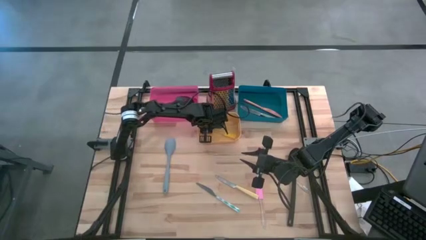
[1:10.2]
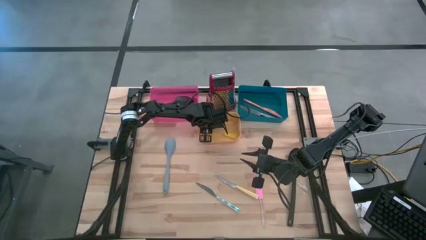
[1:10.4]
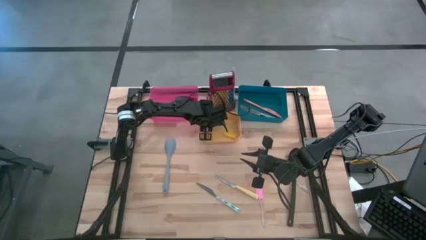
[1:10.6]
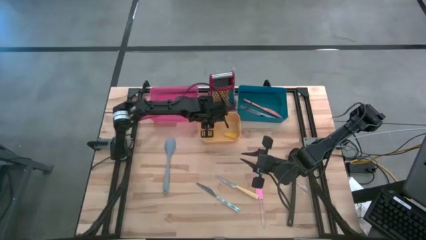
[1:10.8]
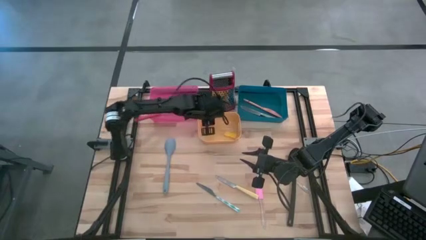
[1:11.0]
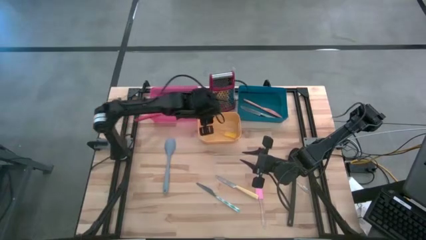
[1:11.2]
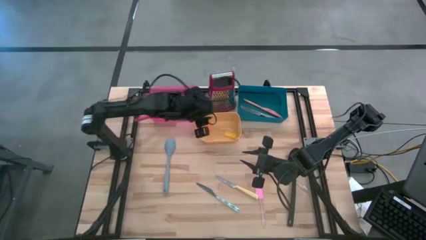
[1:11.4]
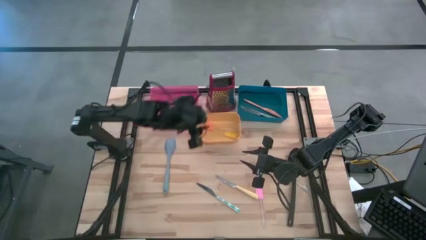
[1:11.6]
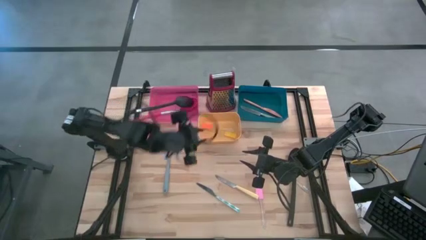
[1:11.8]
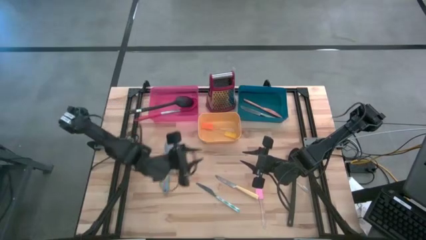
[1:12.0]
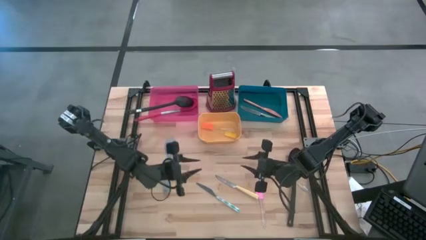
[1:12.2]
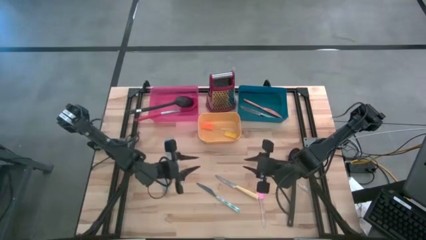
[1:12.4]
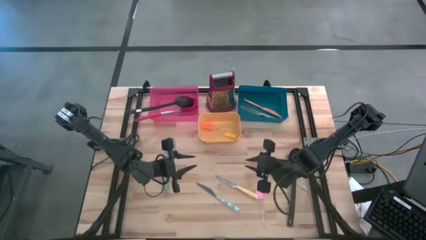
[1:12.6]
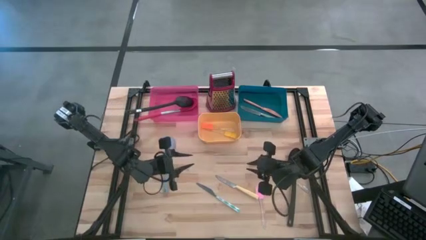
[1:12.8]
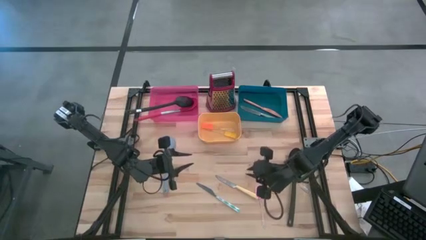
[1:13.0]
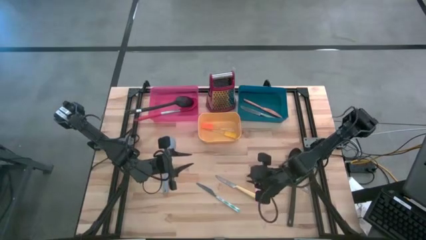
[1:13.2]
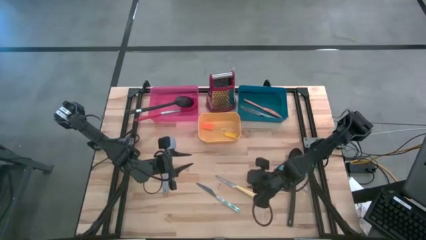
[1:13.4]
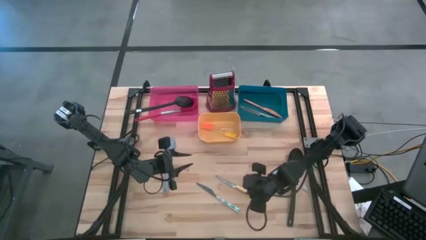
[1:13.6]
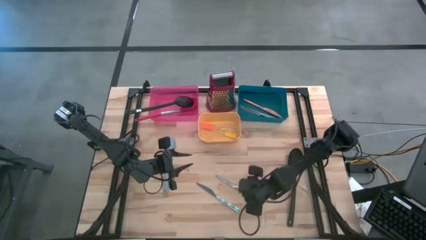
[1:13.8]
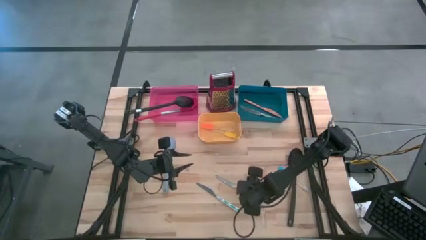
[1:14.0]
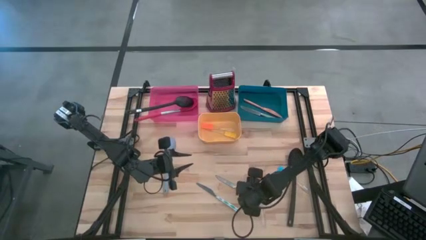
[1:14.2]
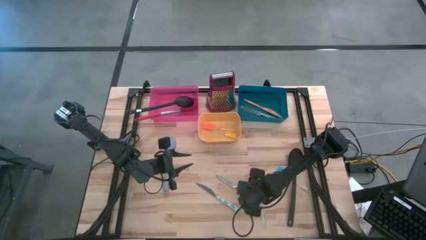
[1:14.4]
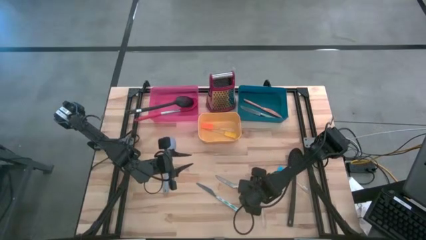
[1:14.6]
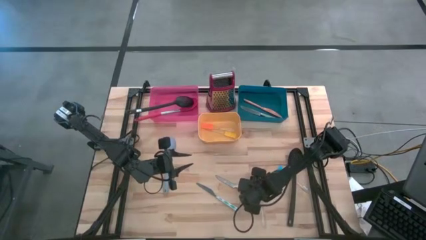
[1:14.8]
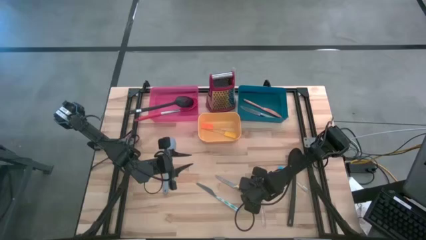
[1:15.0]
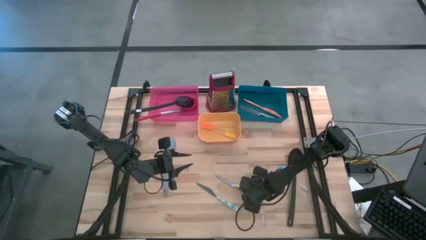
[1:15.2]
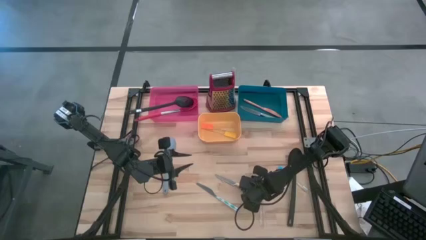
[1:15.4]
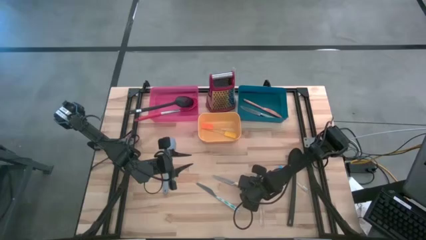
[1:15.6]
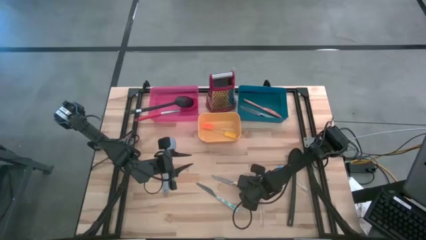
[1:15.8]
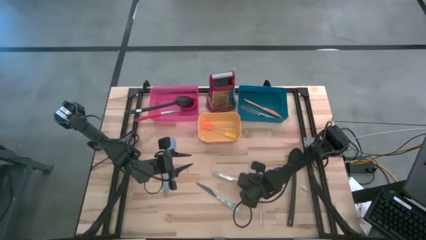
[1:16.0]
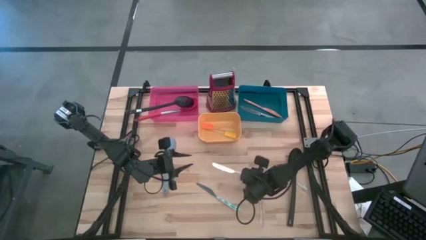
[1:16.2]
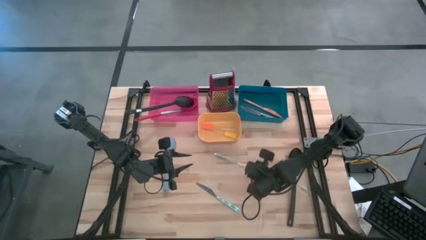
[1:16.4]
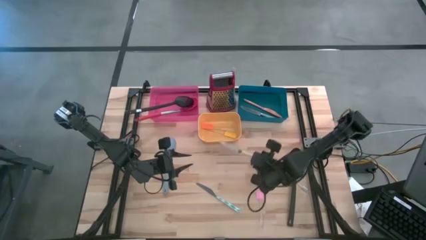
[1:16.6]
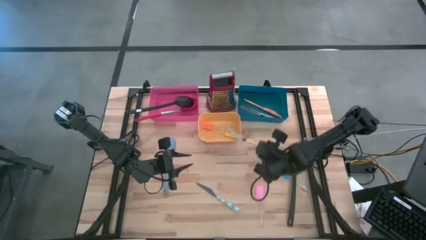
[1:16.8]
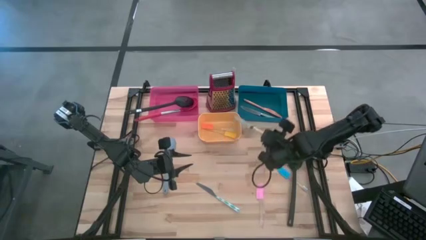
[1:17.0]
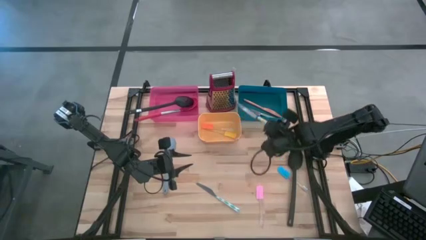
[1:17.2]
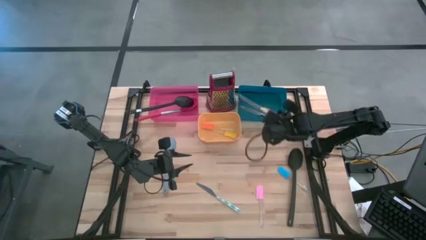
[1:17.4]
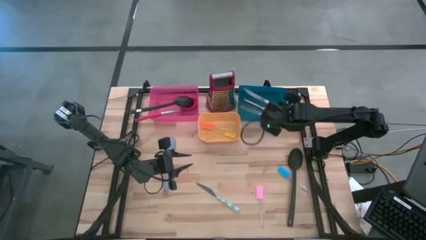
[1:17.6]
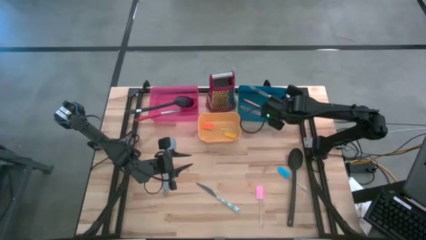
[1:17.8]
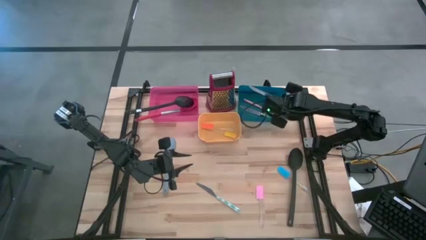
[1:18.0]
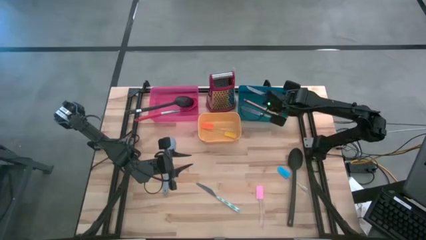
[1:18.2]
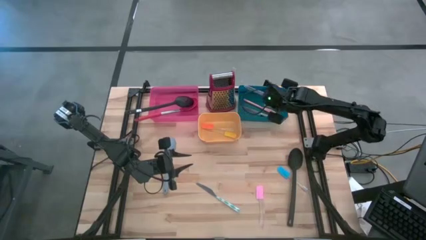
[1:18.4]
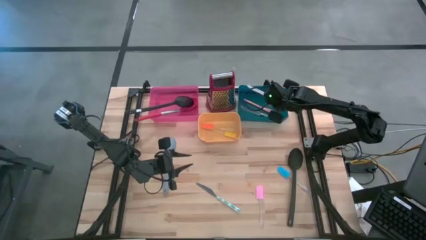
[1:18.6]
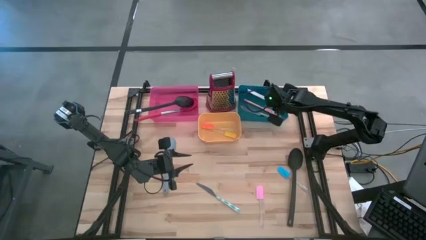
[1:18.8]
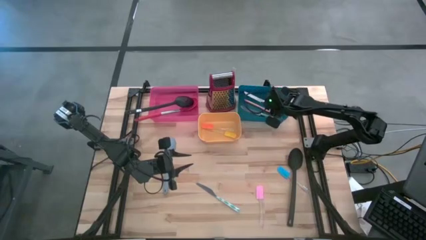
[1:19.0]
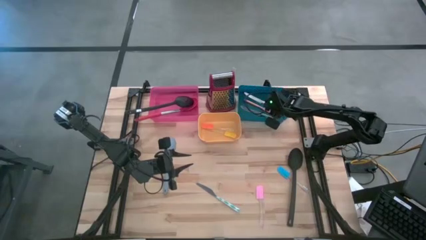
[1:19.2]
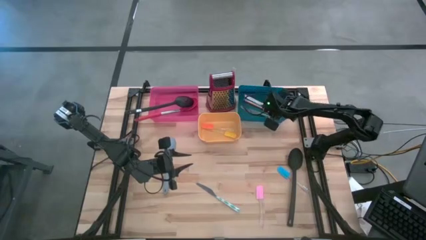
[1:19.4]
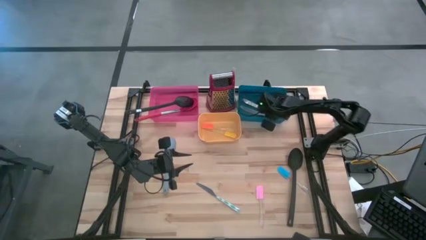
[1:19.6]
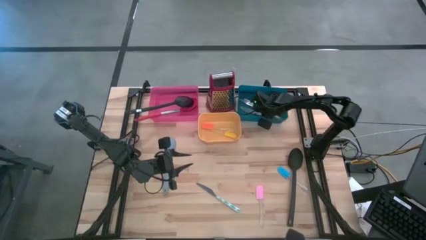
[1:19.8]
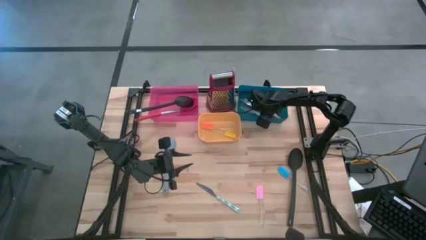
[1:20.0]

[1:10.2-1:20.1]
Task: Pick & Place Kitchen Items
Put the yellow table knife into the blue bin

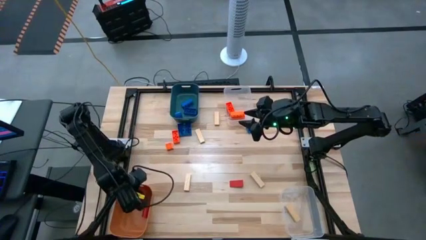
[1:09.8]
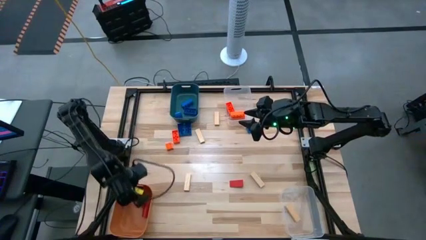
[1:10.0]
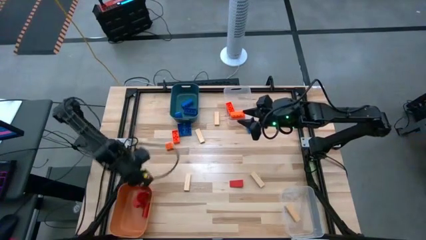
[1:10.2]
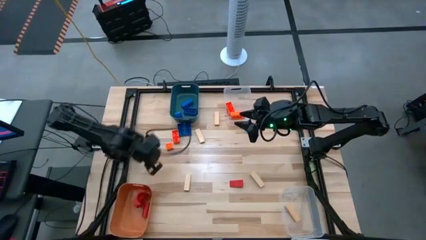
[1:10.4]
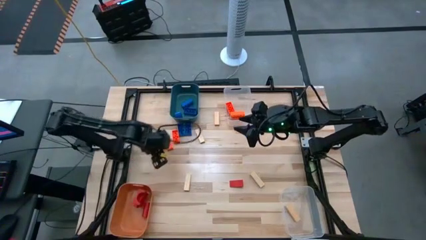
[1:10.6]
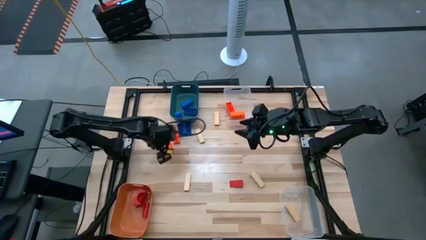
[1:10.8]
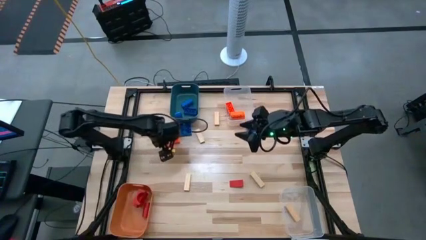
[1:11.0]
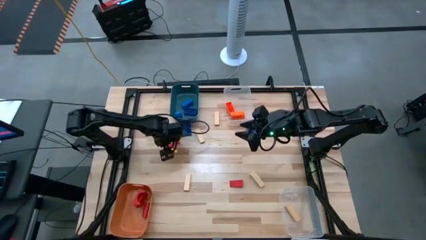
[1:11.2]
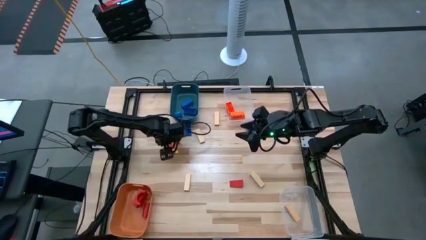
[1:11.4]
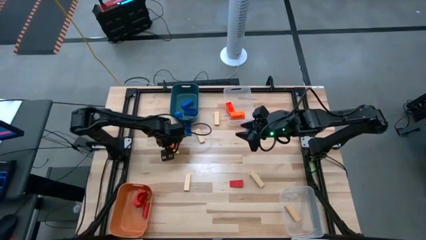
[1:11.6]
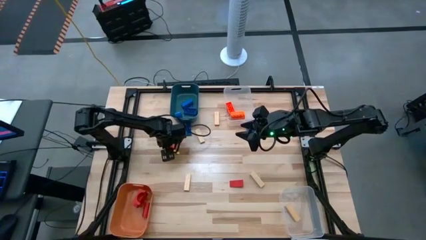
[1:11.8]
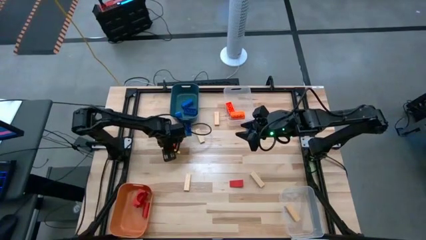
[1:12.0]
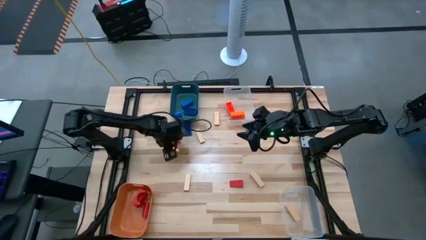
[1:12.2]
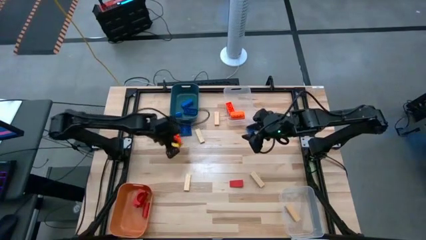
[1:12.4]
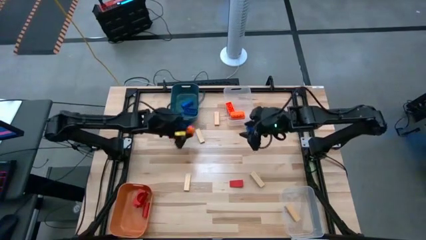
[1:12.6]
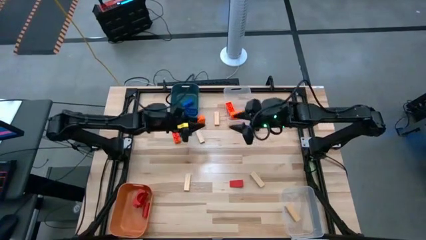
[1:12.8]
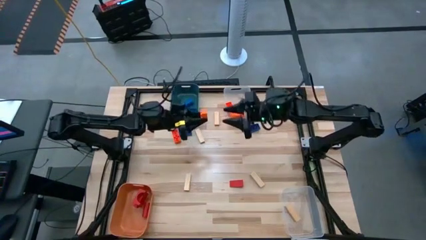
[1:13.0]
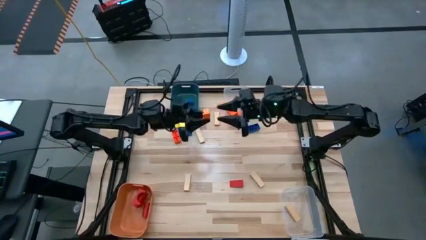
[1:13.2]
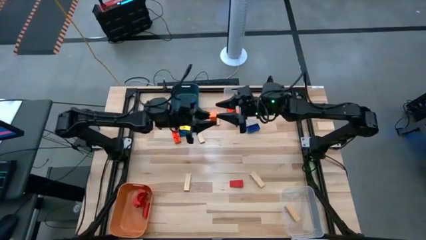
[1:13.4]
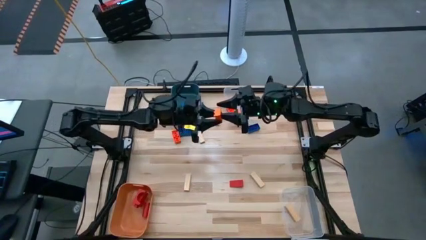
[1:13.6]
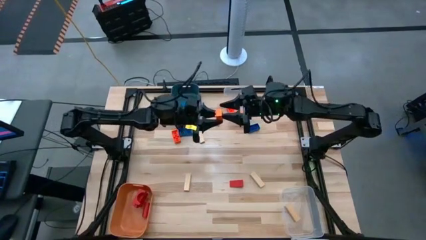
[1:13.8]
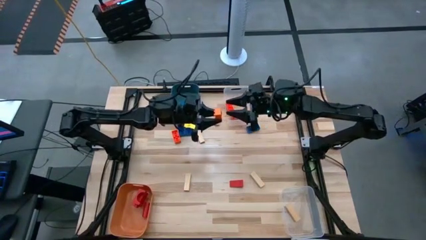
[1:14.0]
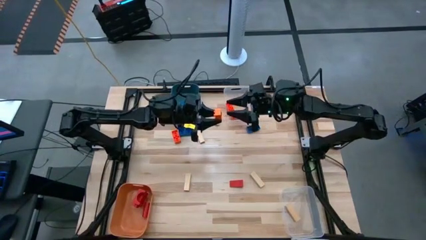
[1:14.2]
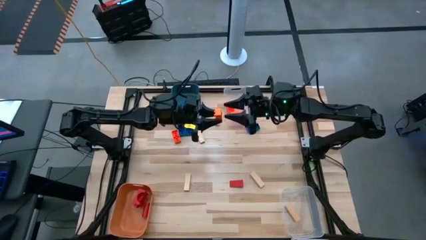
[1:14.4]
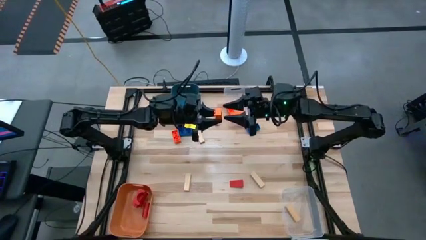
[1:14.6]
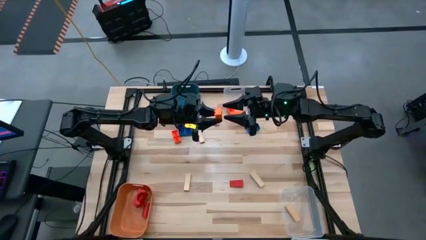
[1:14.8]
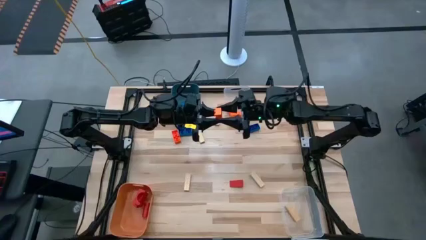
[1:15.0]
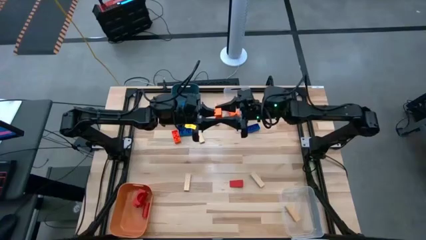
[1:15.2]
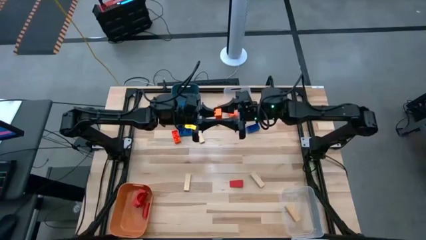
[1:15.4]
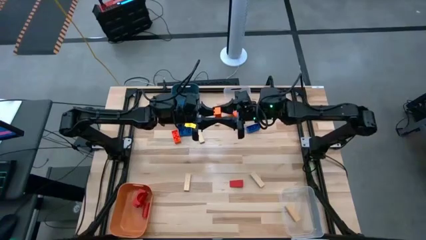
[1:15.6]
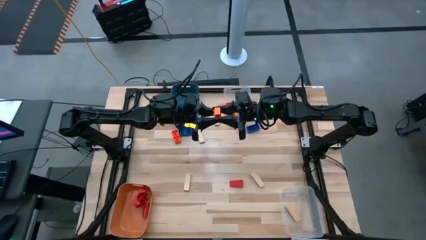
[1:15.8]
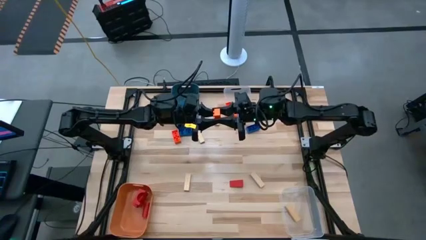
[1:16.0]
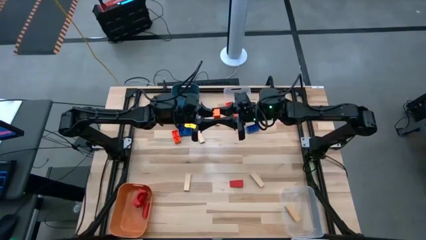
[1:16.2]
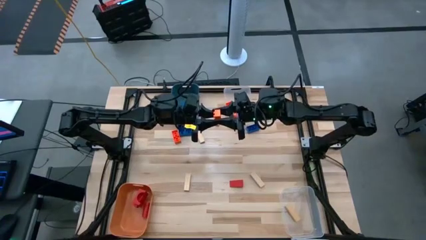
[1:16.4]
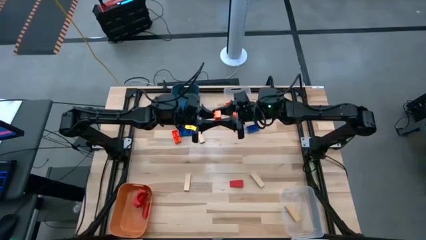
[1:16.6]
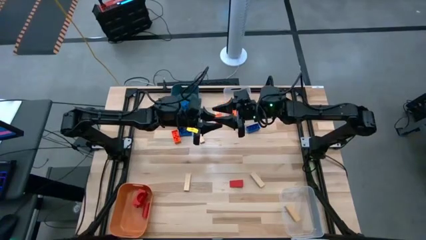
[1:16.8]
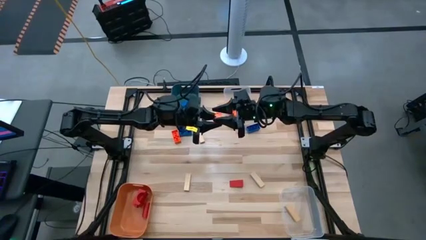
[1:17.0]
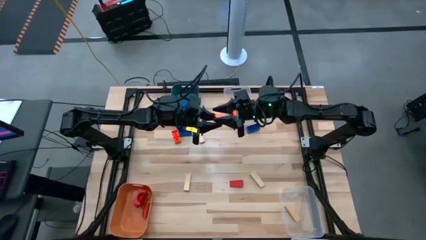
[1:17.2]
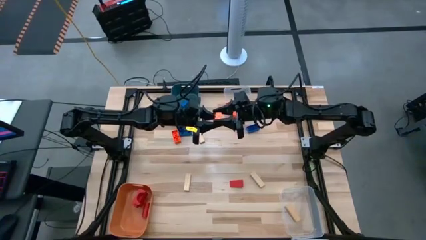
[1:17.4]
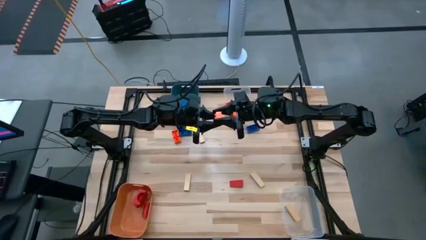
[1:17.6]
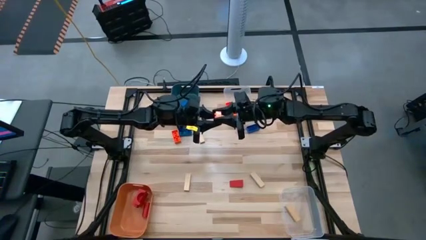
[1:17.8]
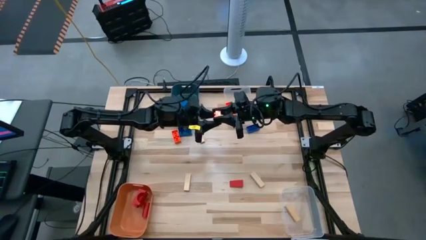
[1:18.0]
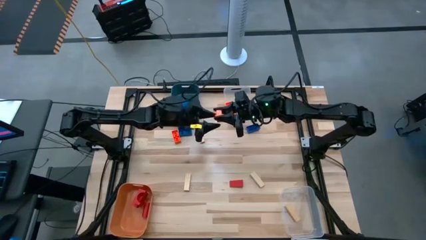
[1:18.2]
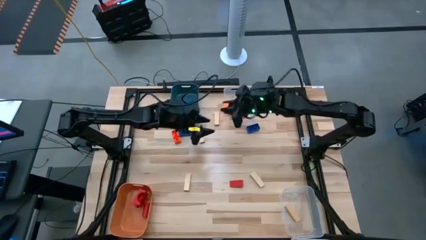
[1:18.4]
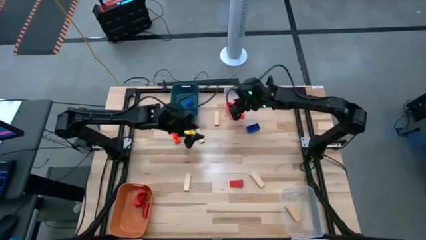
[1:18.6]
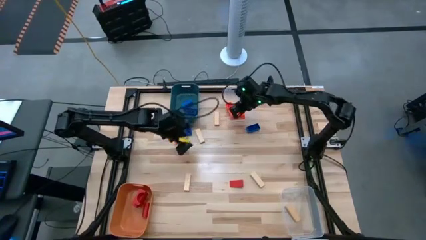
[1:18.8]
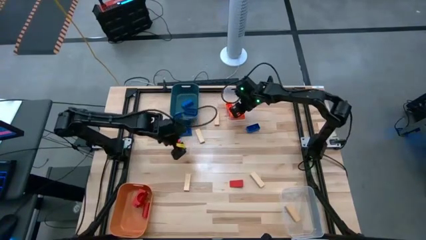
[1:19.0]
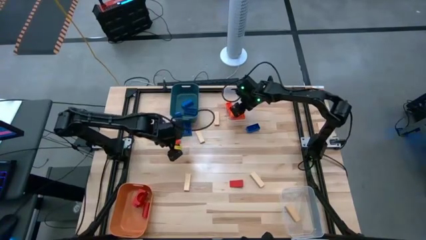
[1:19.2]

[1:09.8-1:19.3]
Task: Sort blocks
Put the orange game piece into the top transparent bin
